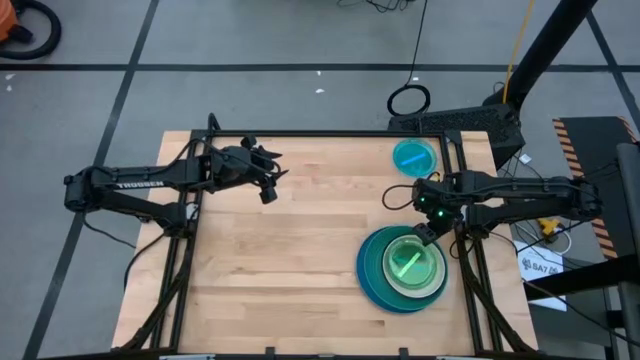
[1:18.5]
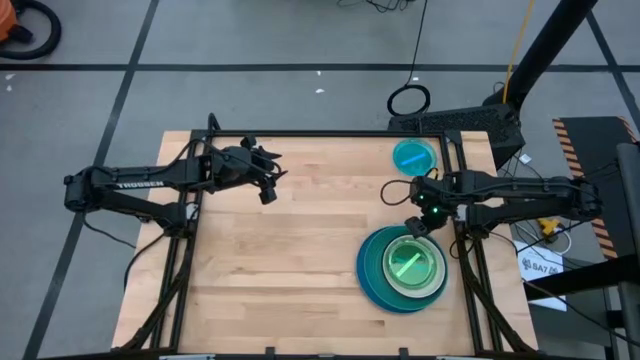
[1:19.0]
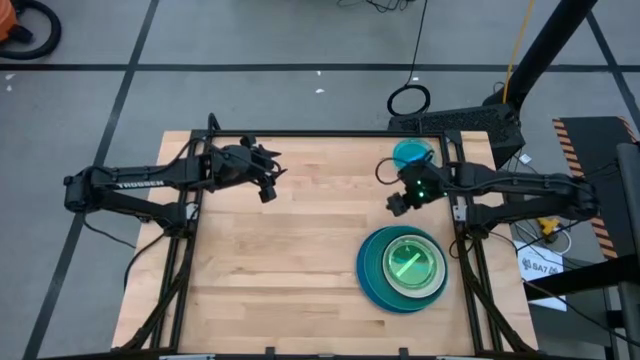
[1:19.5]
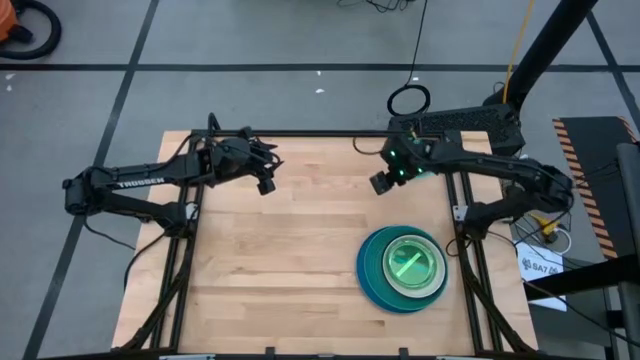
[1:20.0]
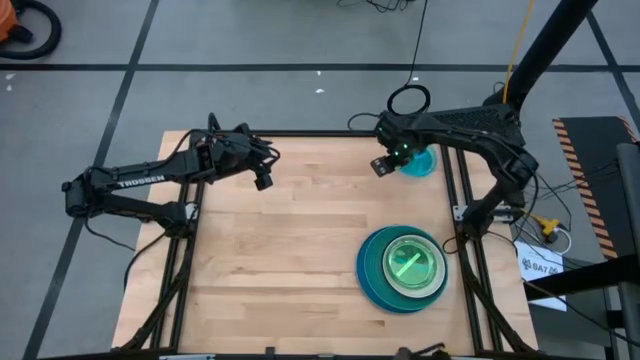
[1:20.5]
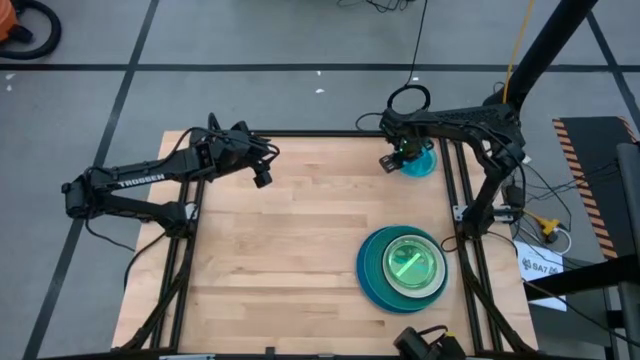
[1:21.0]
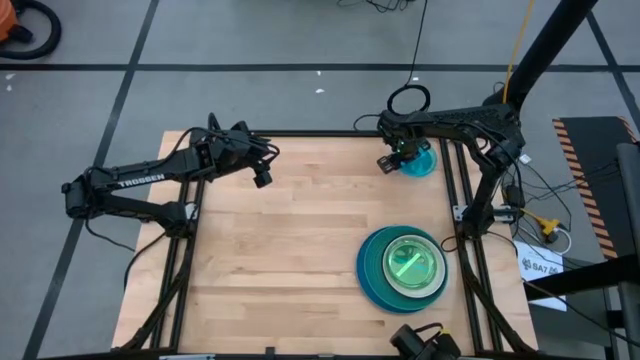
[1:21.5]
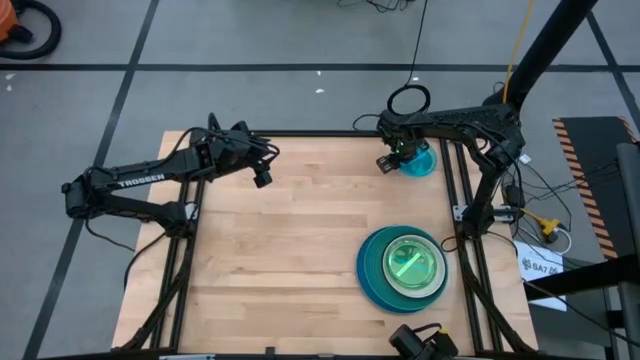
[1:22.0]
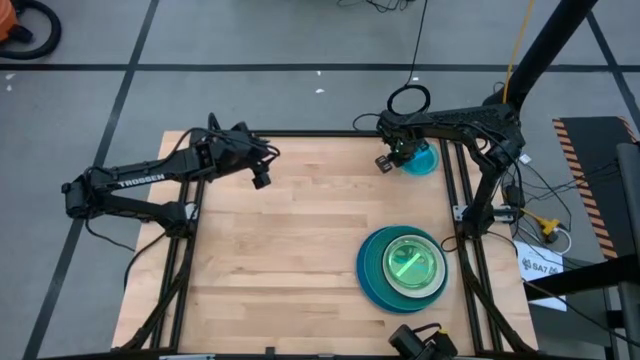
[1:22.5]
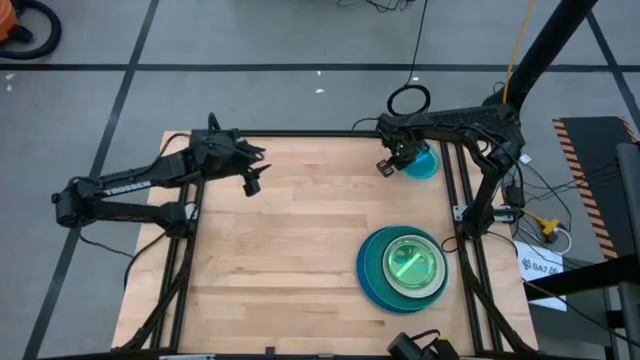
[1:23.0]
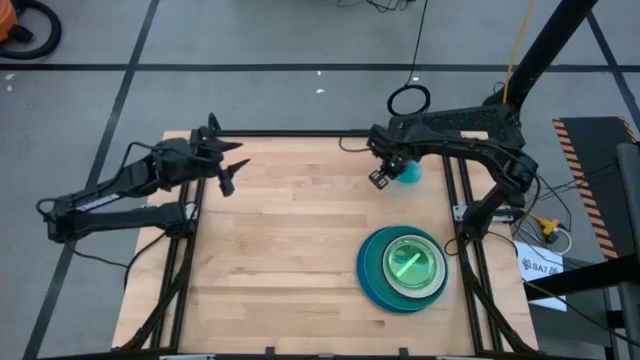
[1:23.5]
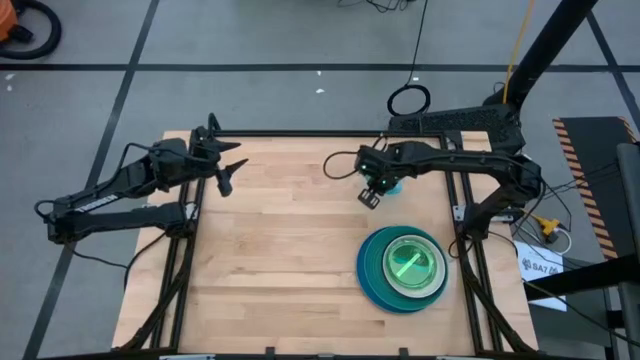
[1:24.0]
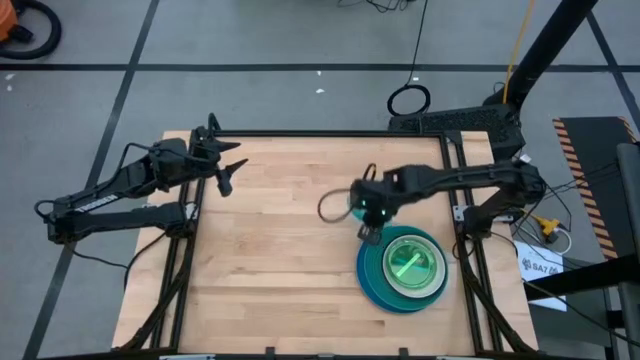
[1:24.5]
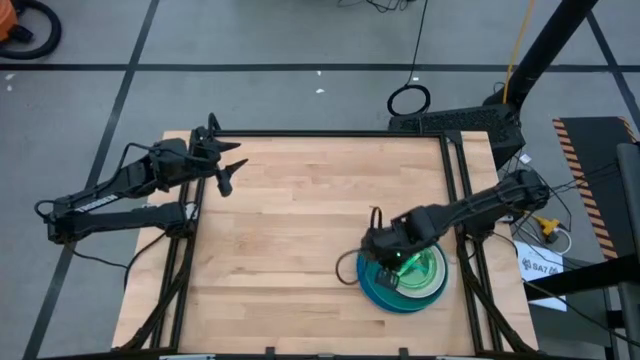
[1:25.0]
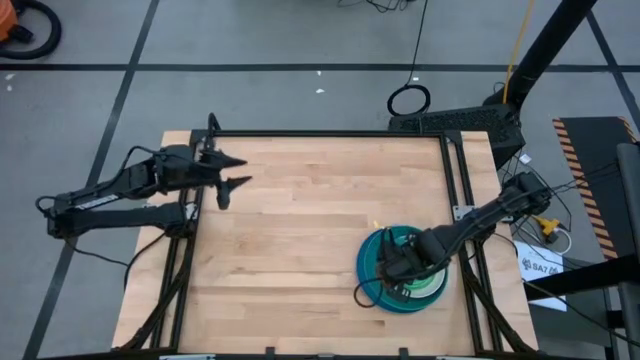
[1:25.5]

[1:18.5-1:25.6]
Task: Stack plastic plates
Stack the light blue plate on top of the light green plate

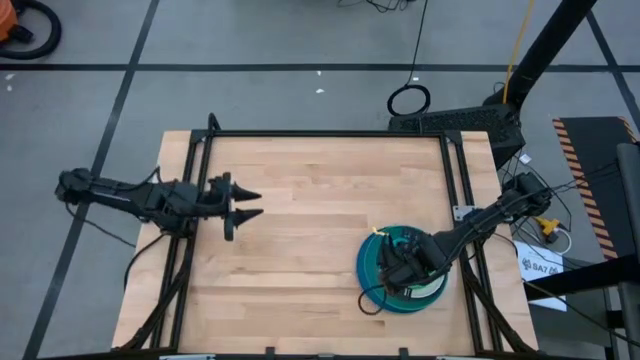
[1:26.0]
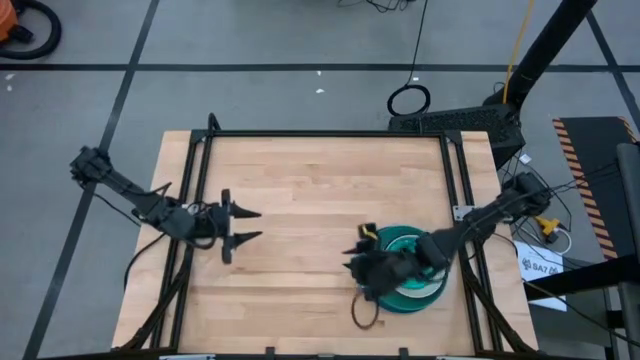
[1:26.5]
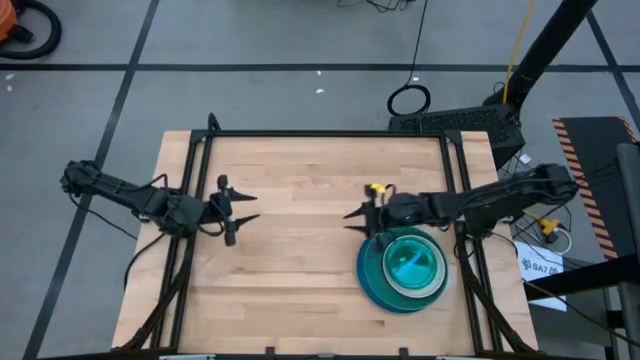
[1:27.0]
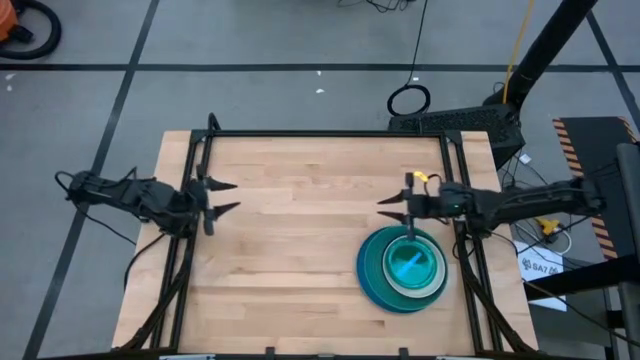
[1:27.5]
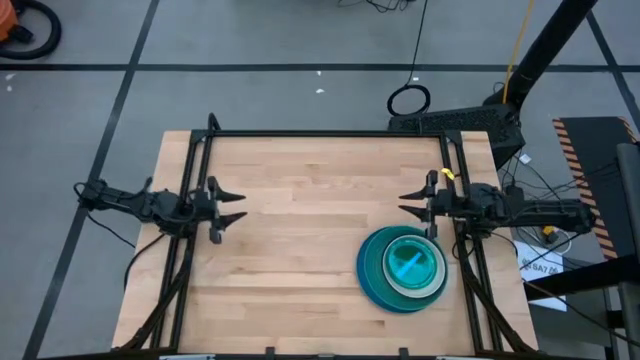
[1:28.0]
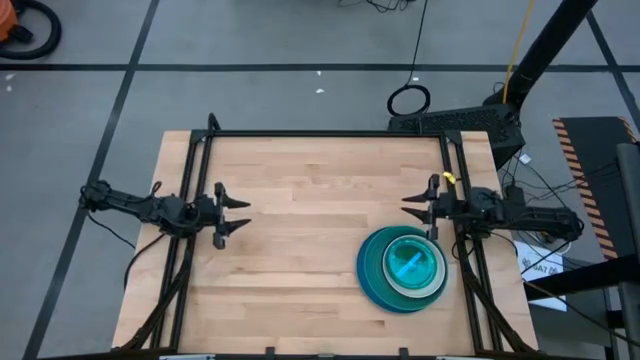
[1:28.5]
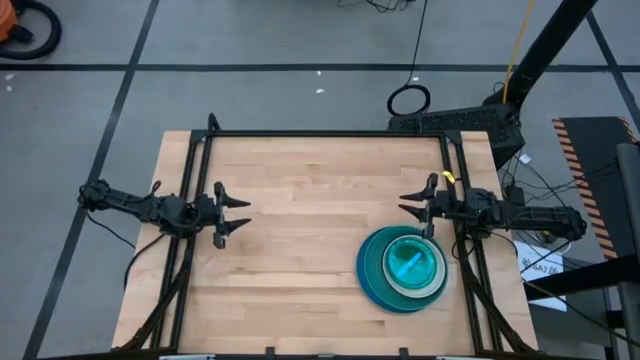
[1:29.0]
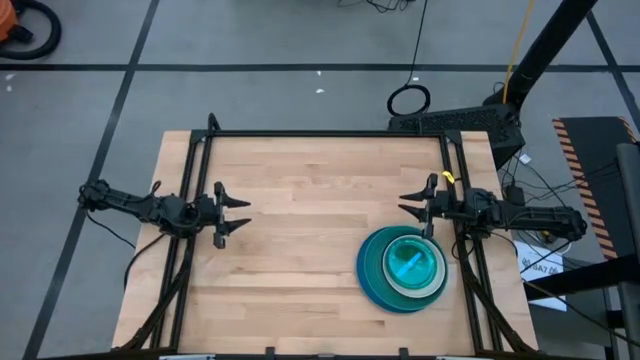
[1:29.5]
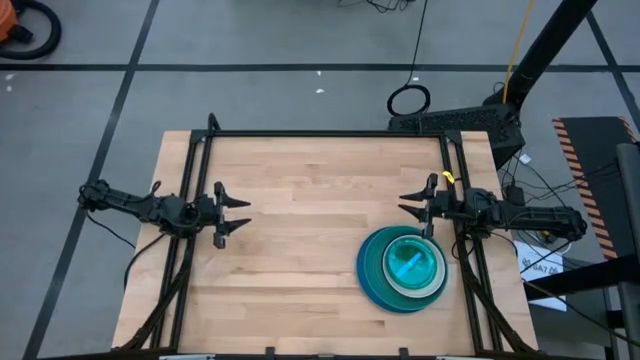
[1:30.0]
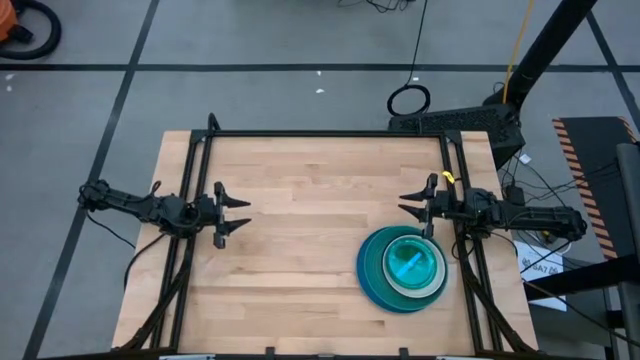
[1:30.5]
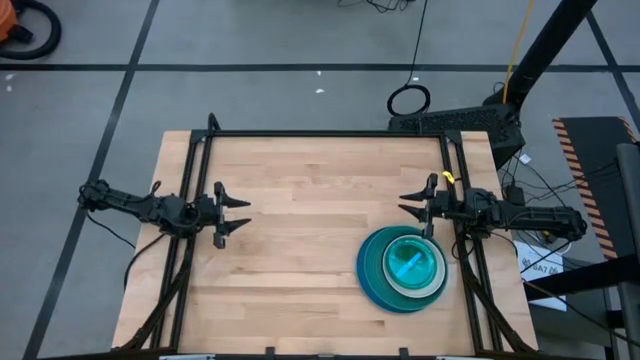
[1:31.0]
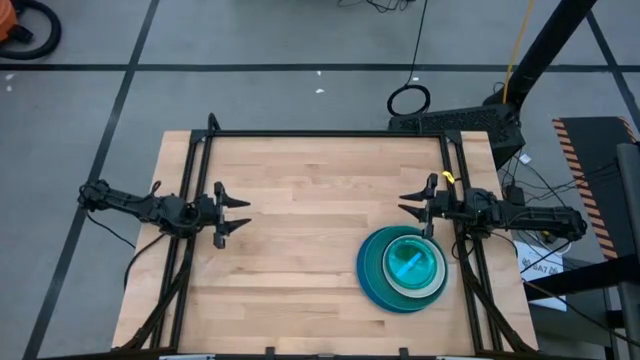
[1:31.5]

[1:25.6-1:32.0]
Return to Home Position

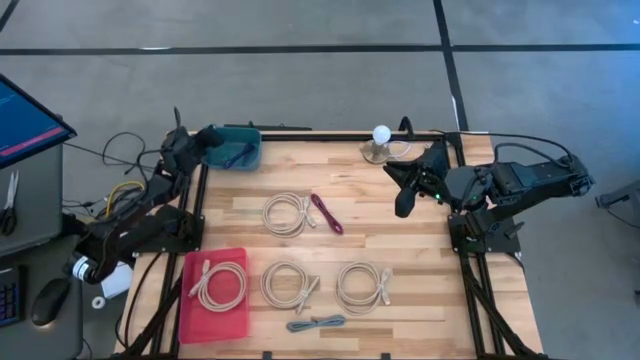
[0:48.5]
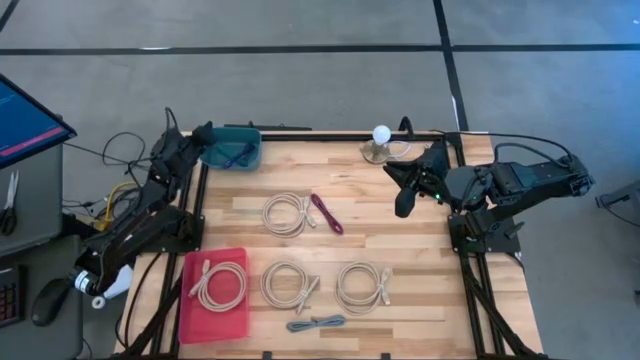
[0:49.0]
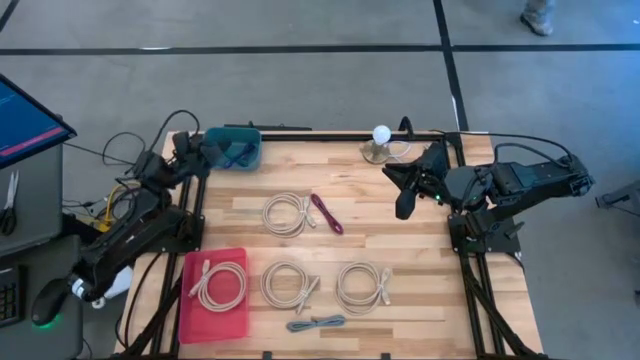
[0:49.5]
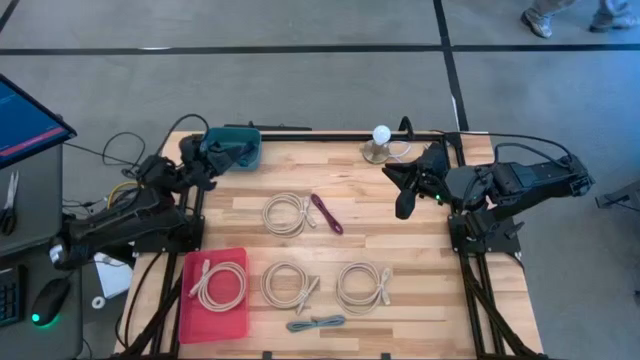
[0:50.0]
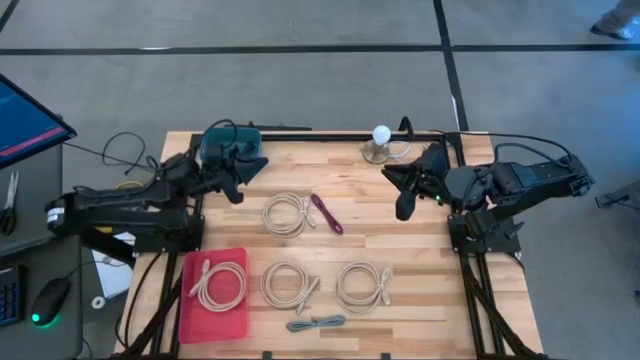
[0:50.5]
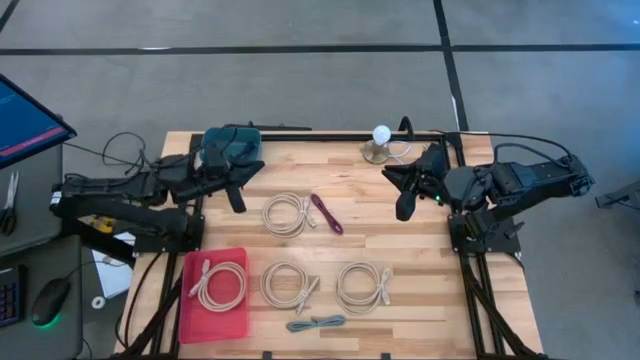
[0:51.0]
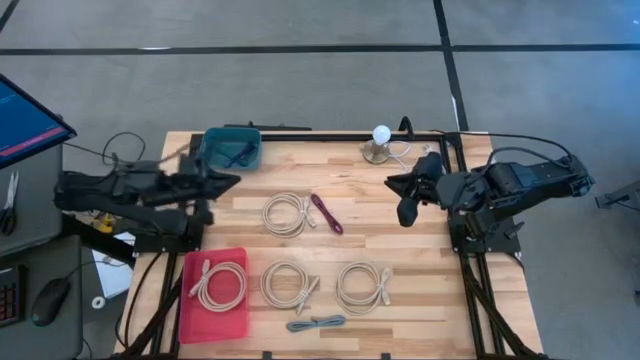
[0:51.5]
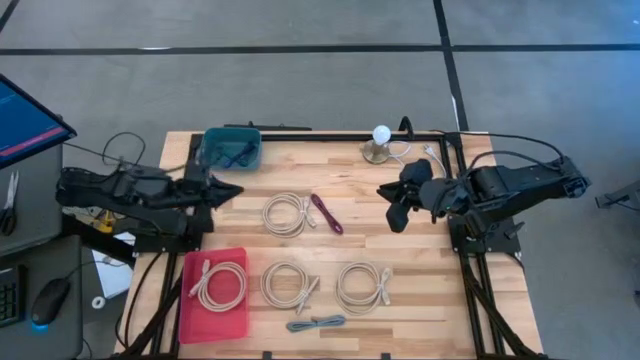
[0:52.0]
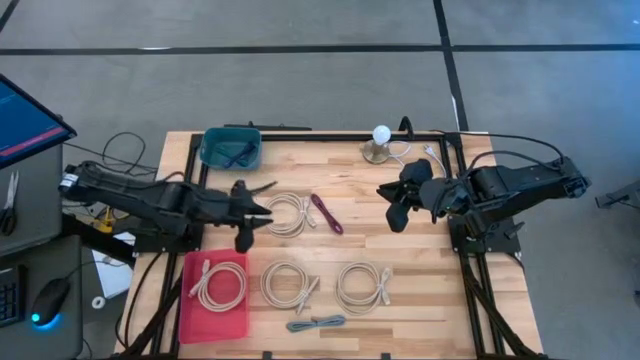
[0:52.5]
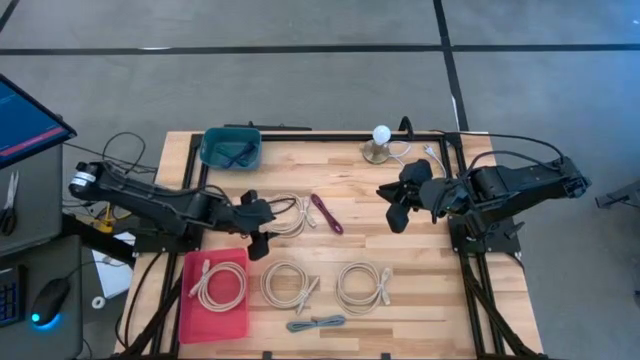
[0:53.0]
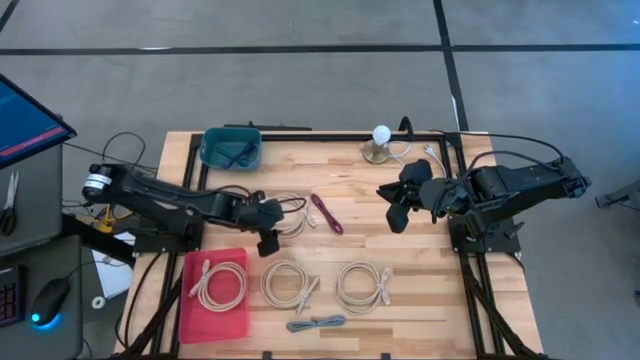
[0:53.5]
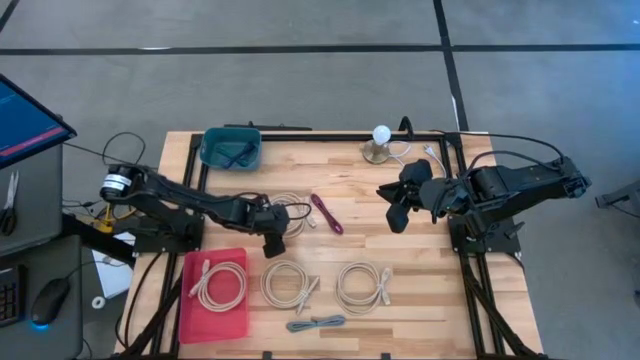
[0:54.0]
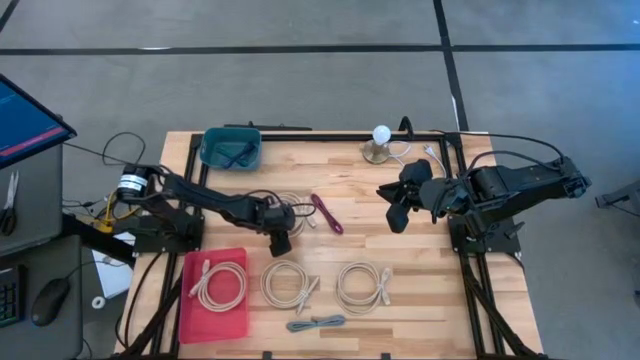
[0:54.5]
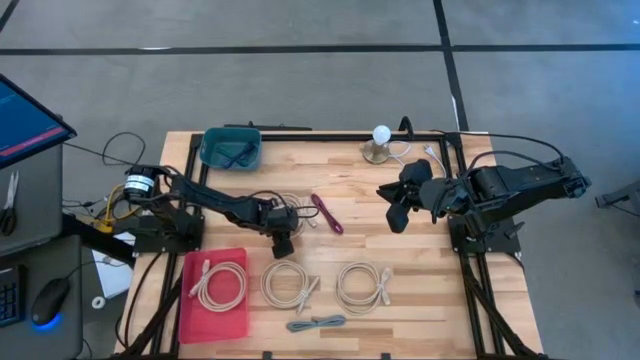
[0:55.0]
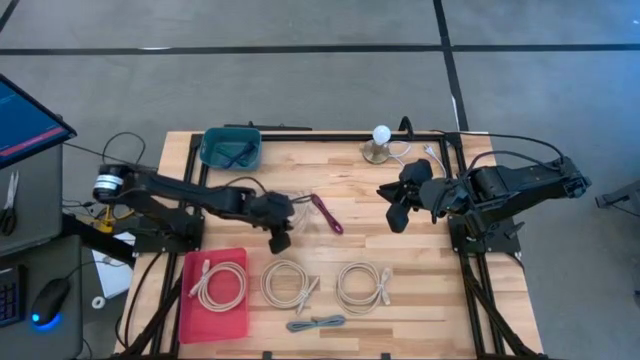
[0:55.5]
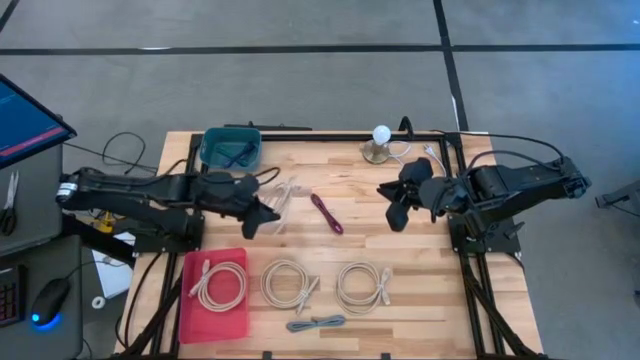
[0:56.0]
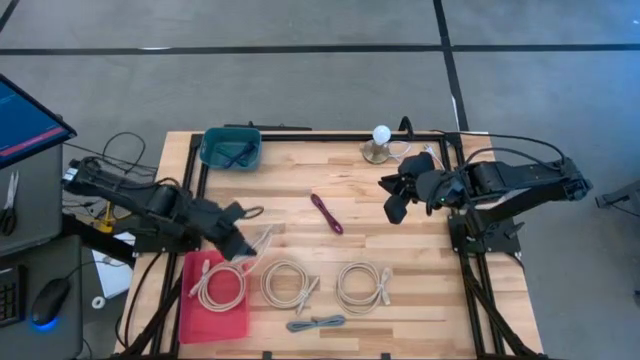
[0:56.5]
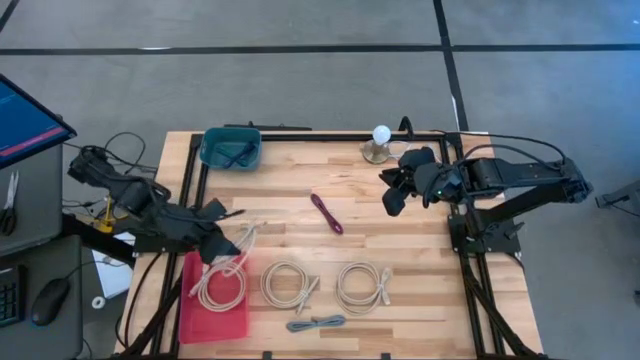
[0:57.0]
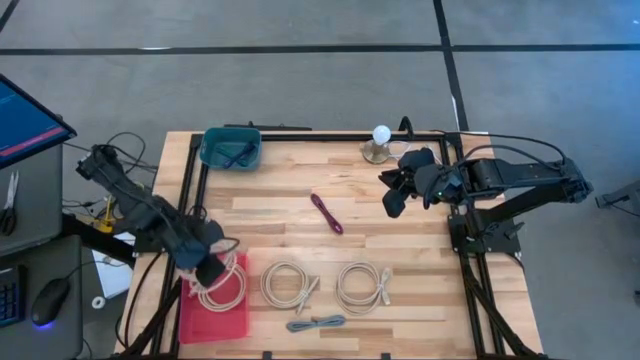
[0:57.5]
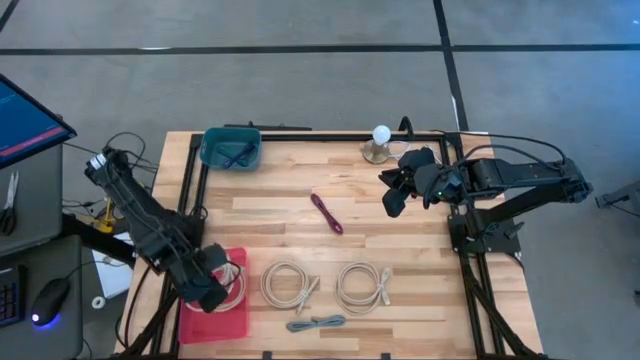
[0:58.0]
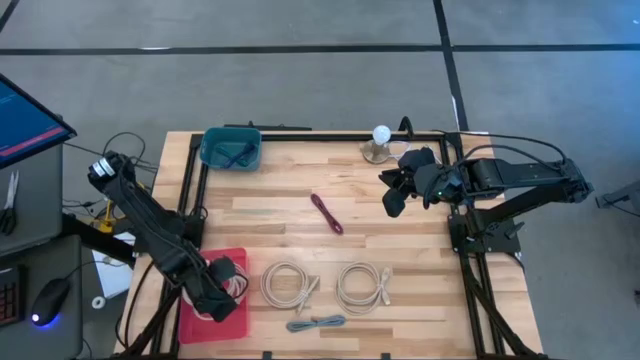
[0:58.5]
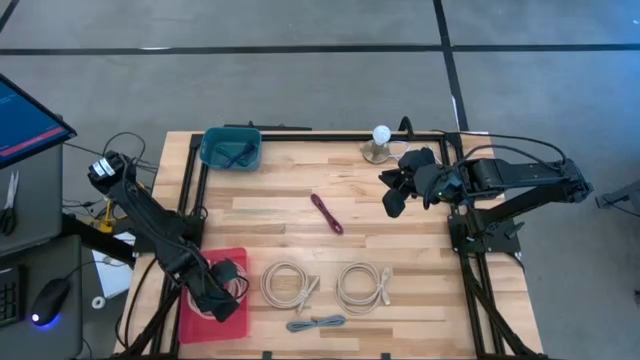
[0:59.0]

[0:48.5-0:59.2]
Task: Pick & Place USB Port
Put the brown HDMI cable into the red bin
